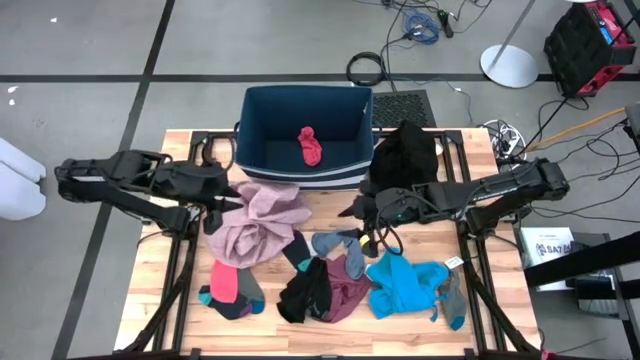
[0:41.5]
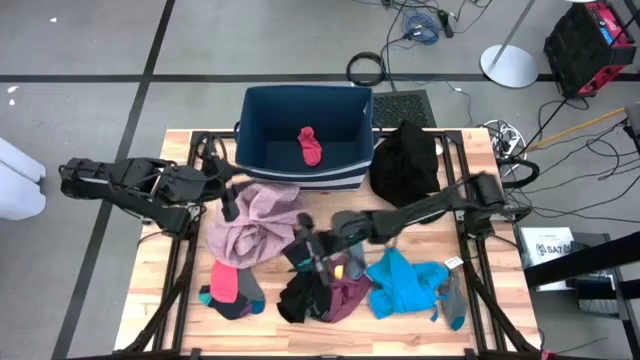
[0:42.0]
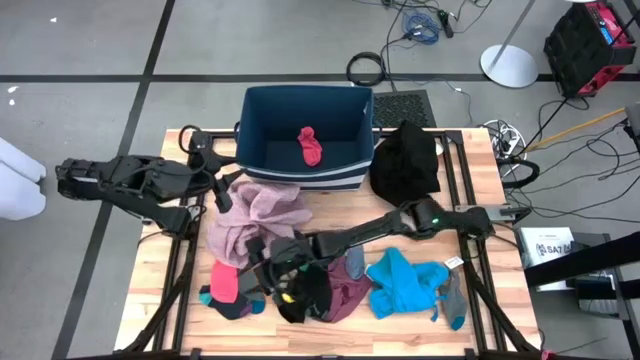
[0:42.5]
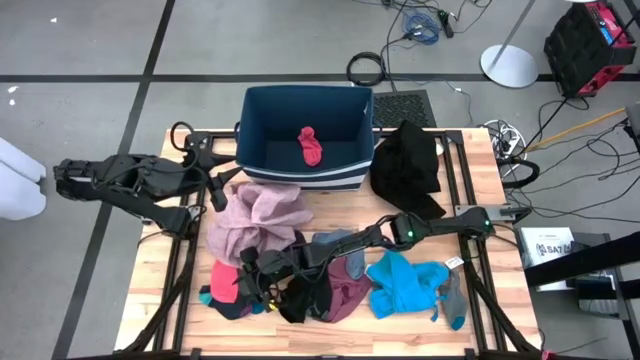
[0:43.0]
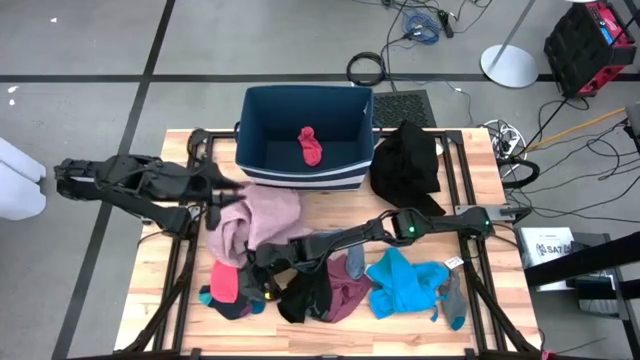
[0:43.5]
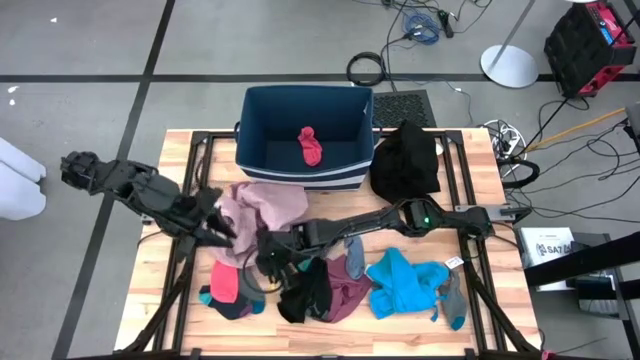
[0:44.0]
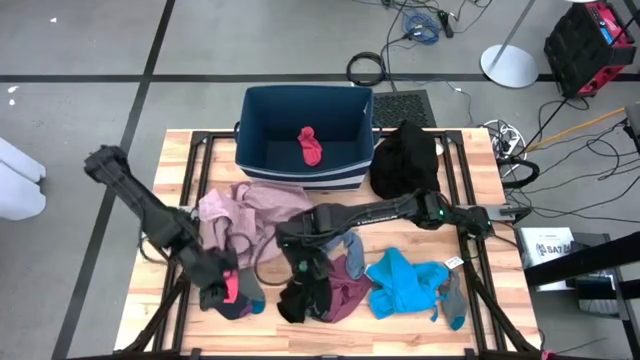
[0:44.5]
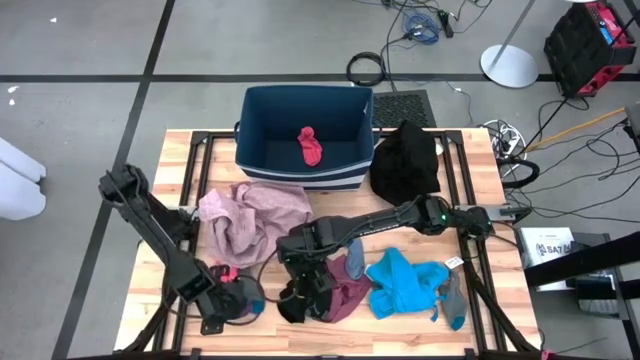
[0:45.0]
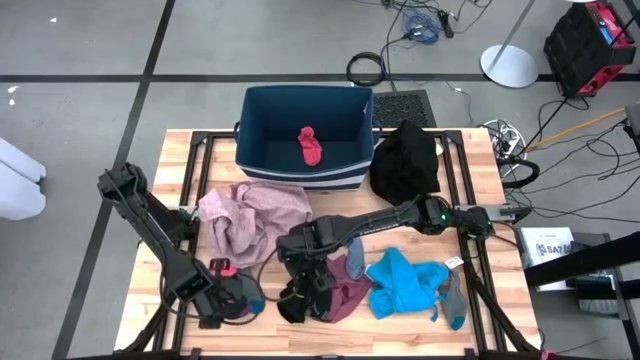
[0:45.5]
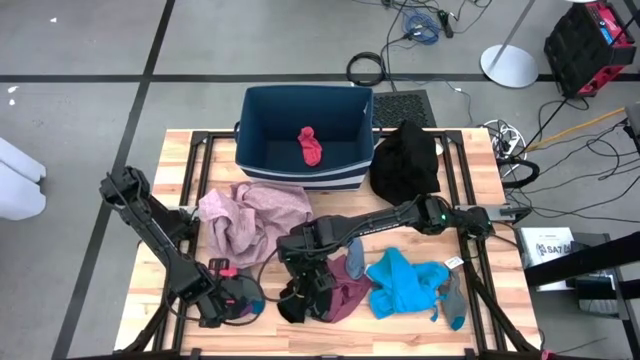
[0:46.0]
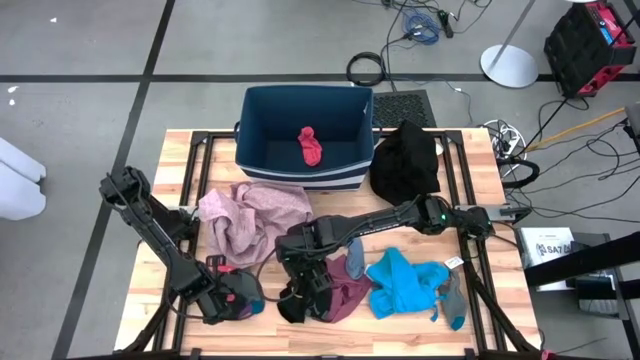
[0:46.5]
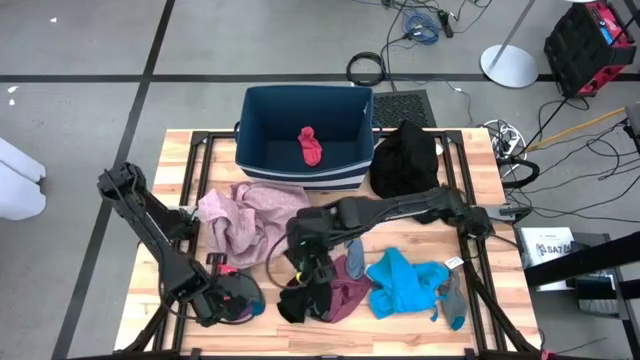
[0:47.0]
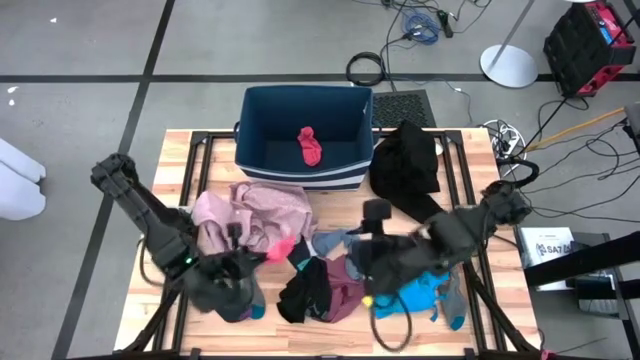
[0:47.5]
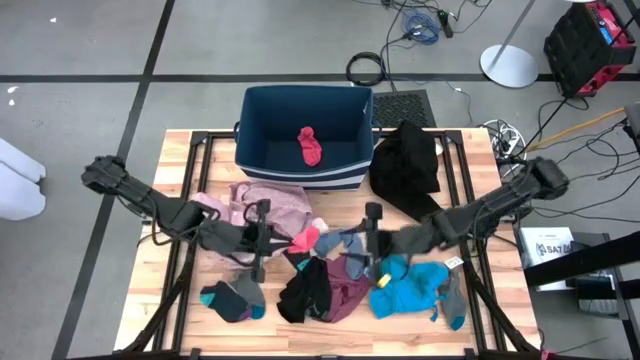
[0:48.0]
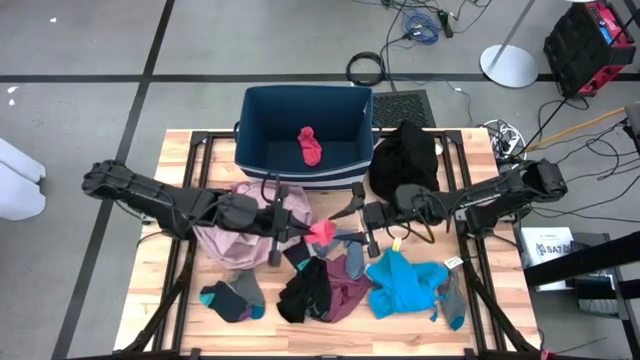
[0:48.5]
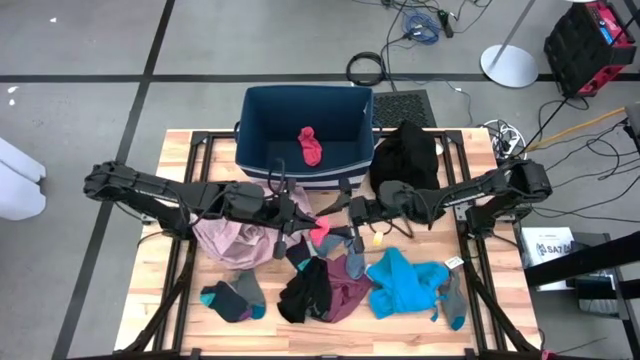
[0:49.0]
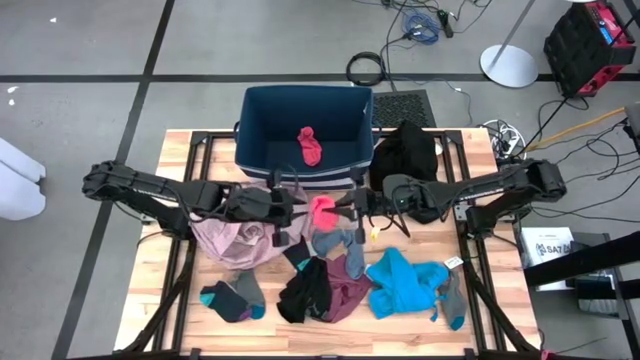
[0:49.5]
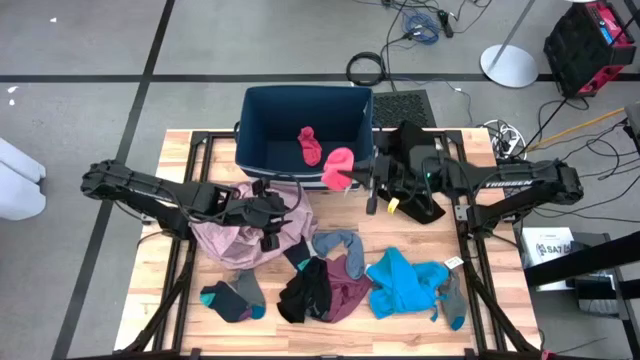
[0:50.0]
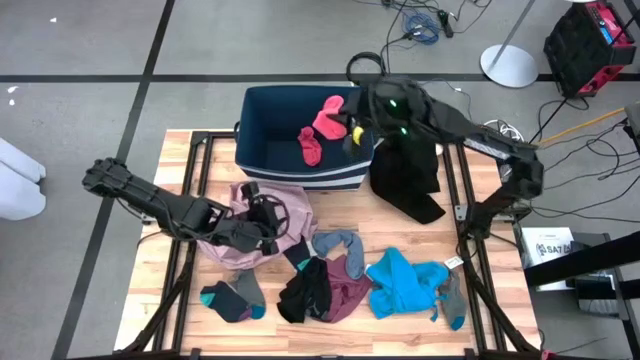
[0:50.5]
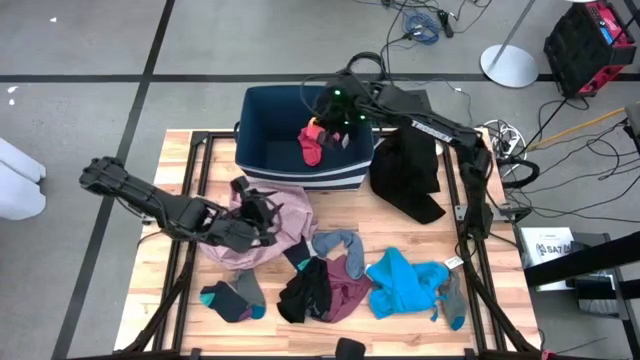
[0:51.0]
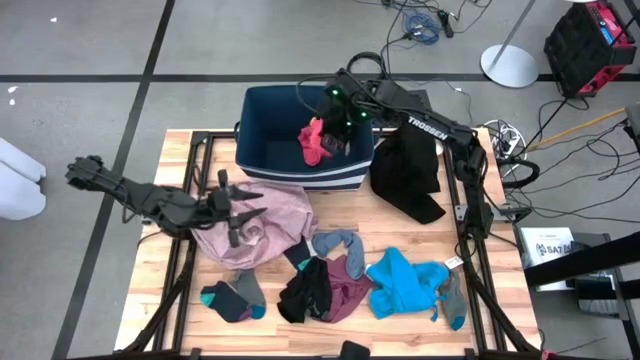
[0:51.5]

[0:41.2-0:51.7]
Task: Sort clothes
Put the pink sock into the blue laundry organizer

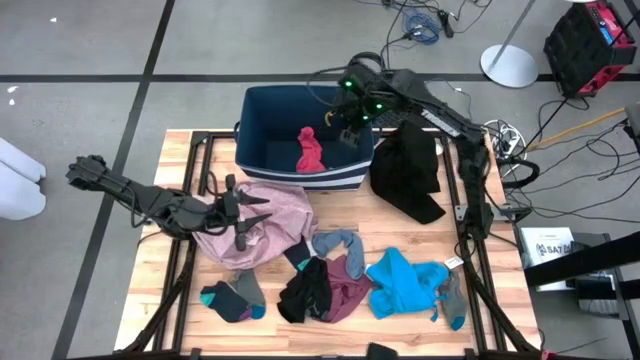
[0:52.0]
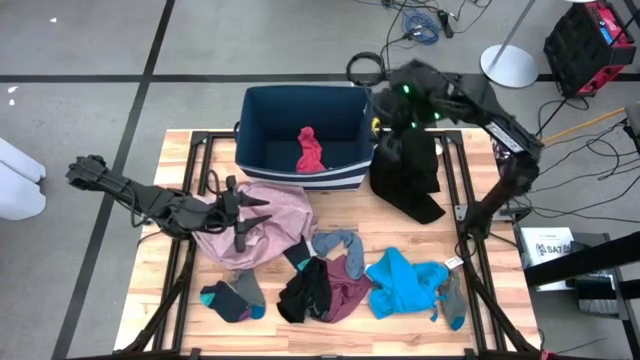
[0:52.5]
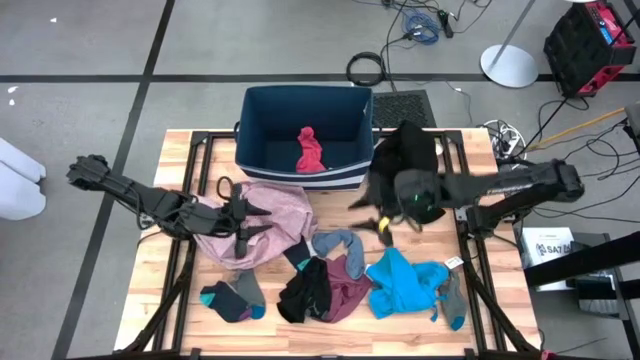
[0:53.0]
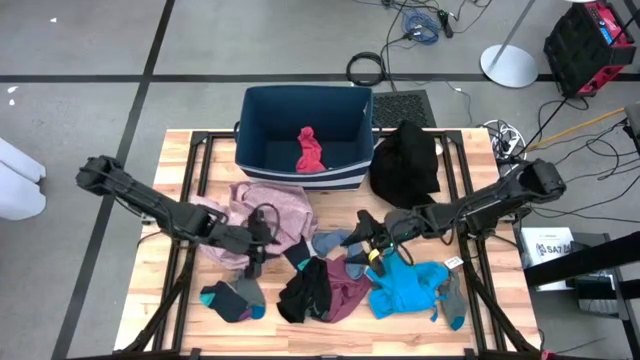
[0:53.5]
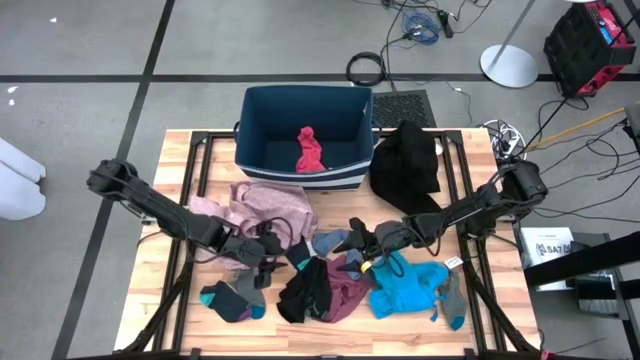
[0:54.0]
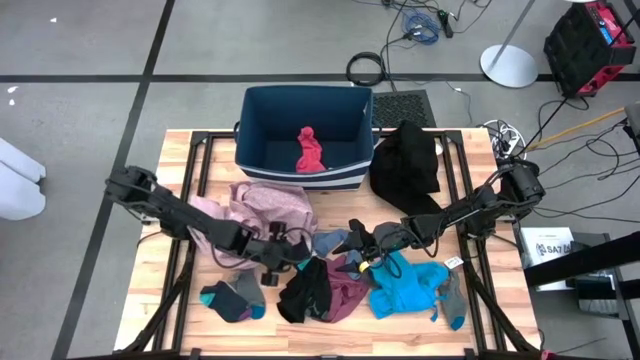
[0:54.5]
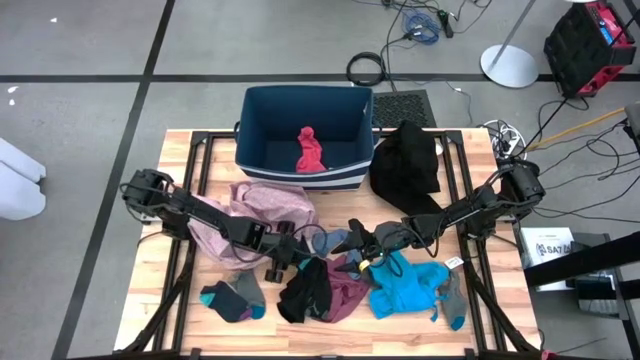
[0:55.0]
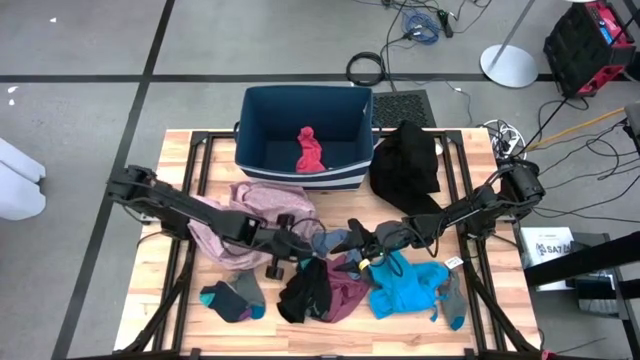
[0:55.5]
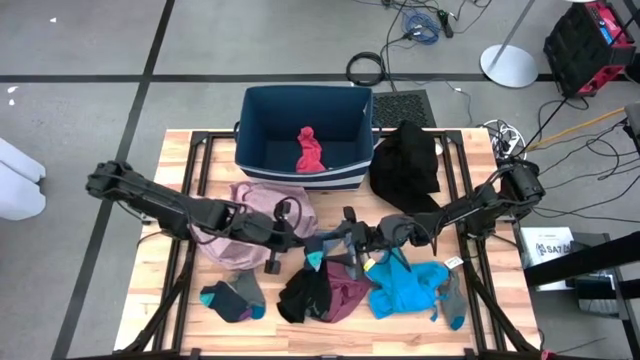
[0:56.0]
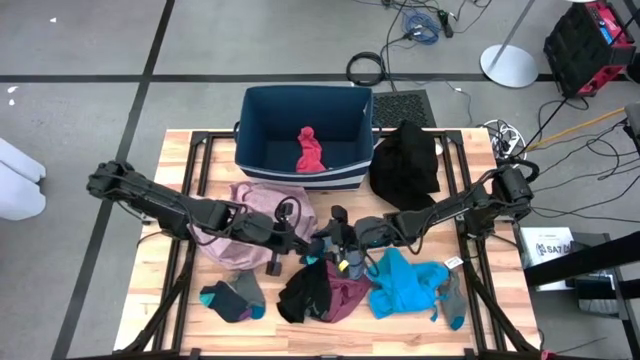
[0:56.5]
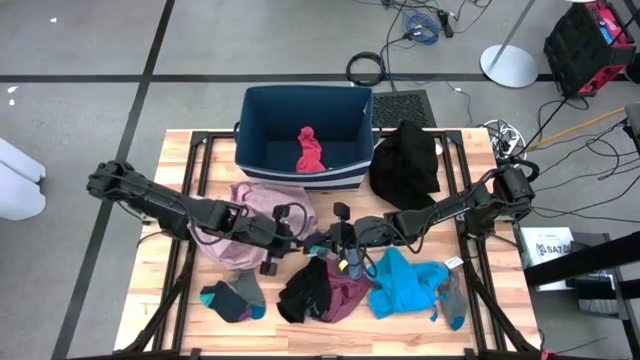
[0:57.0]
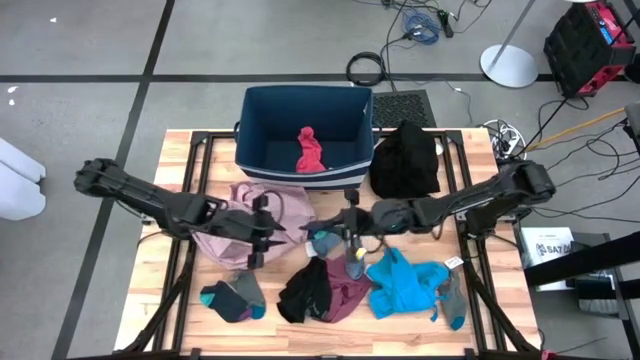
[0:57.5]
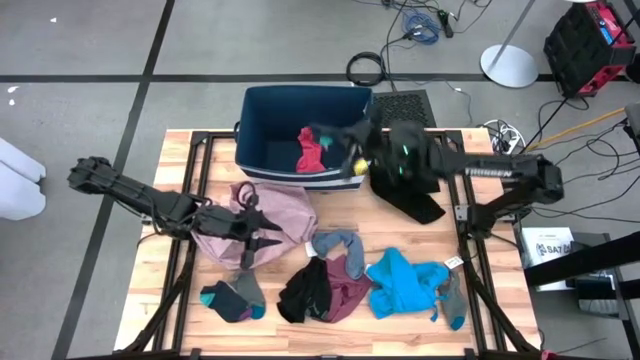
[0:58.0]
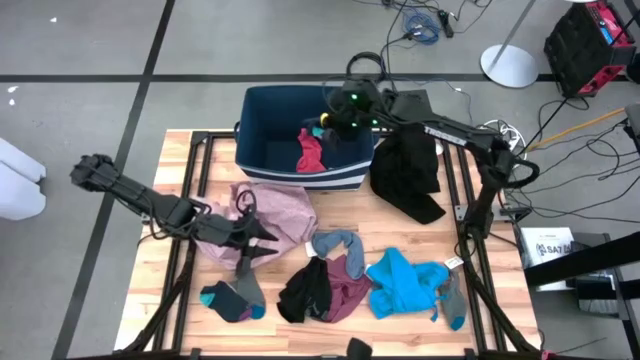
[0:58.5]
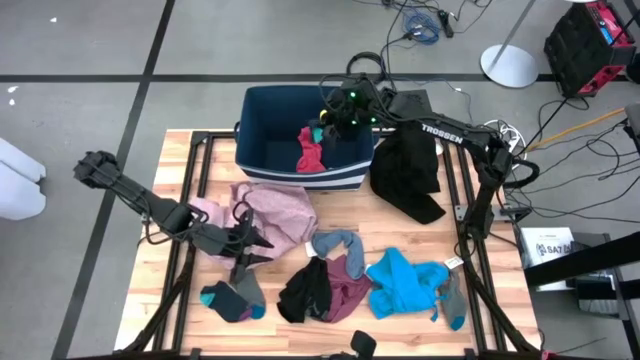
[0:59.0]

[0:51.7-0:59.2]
Put the dark blue sock into the blue laundry organizer

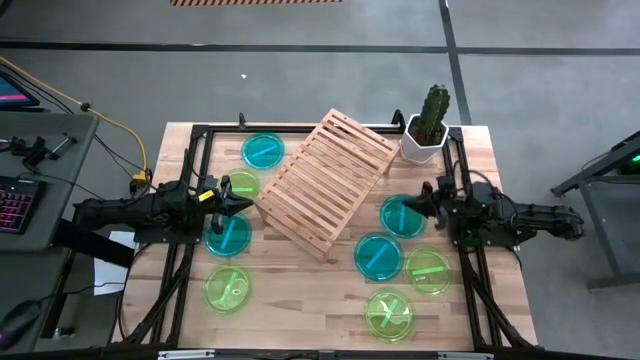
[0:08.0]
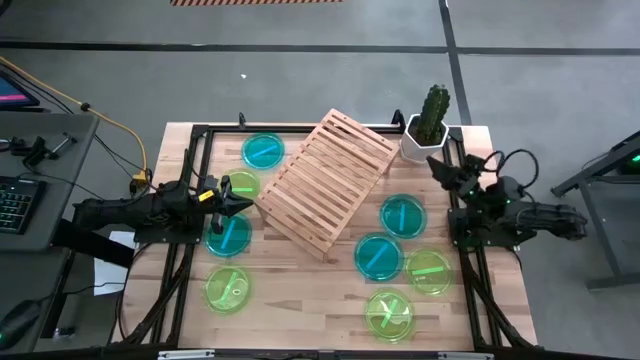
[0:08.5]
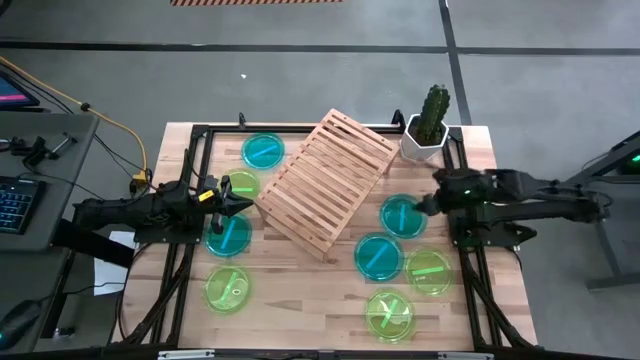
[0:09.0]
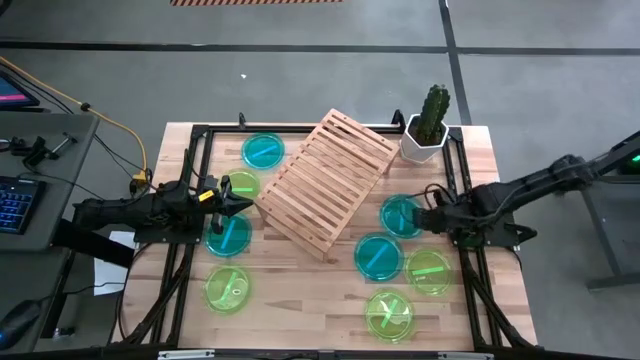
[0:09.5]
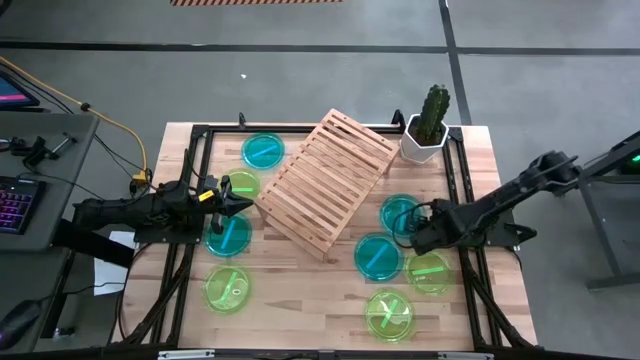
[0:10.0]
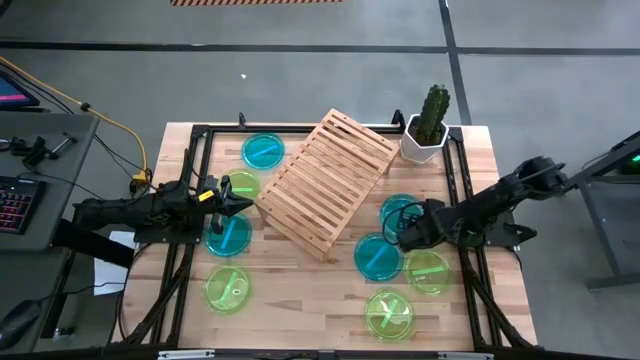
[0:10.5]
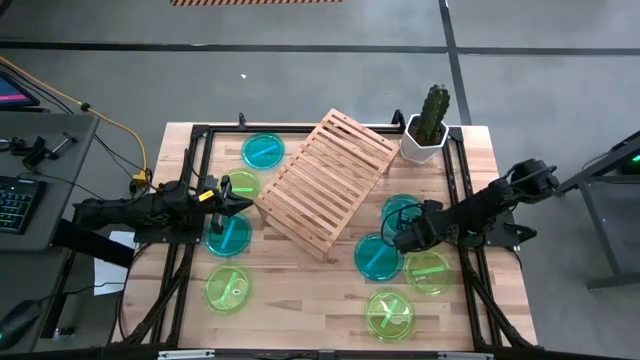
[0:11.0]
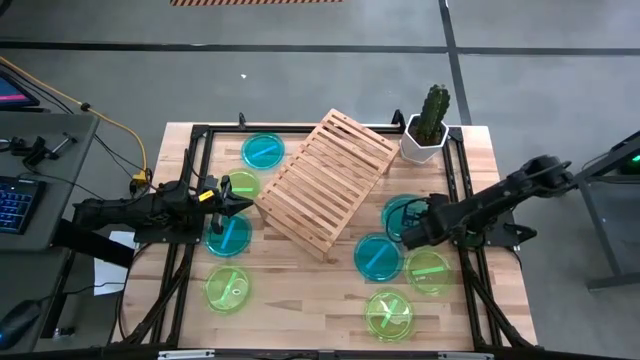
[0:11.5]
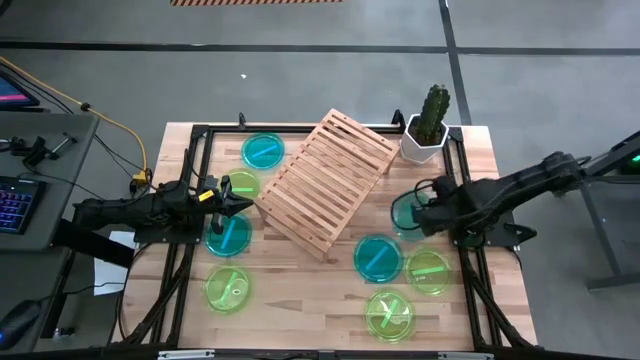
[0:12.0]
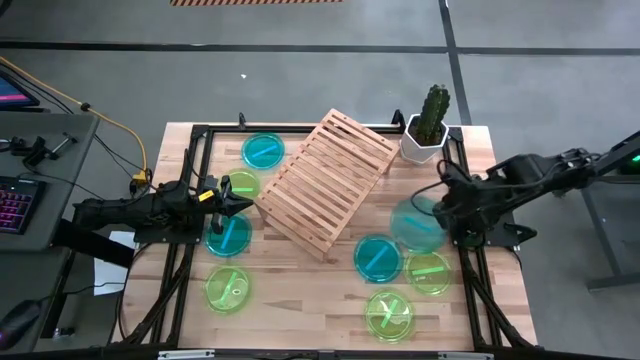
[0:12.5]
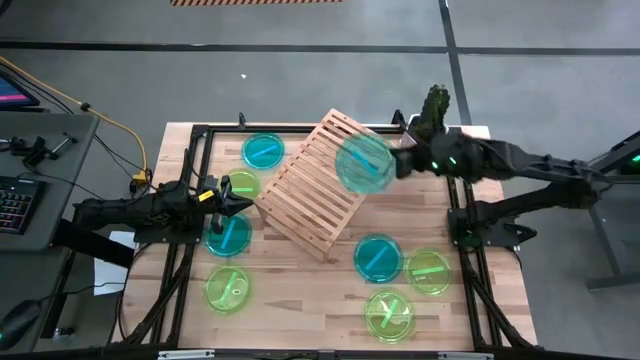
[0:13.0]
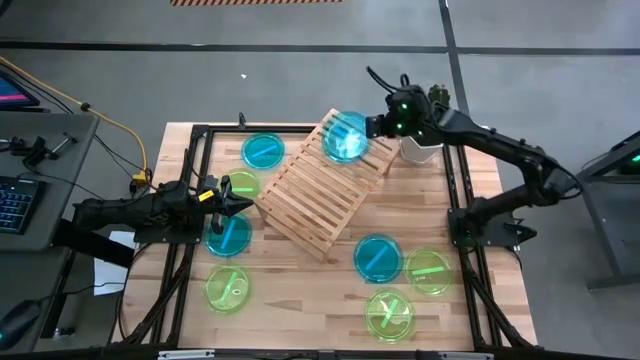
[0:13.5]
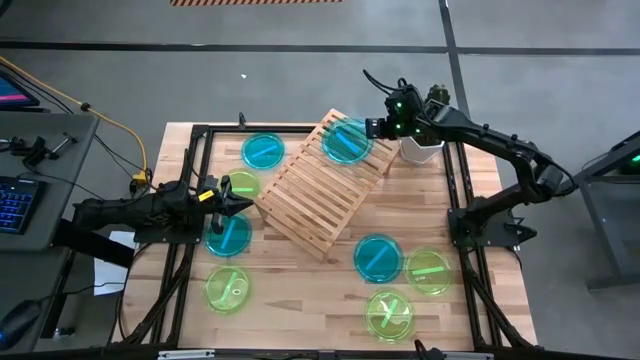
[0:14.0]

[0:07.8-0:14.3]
Task: Place and stack plates onto a shelf
Put the top right blue plate on the shelf
